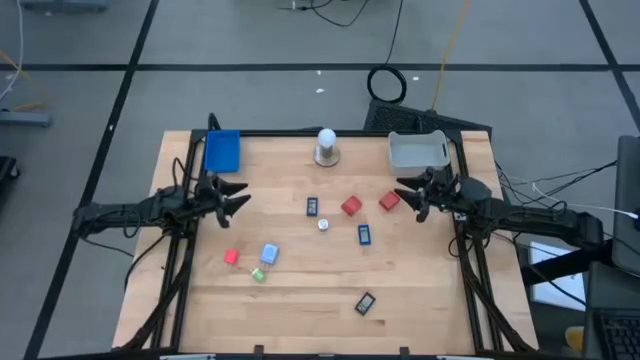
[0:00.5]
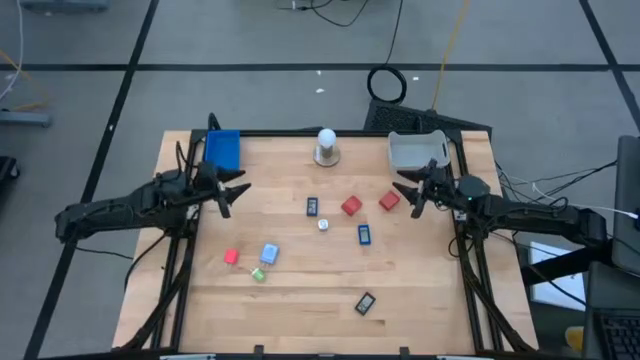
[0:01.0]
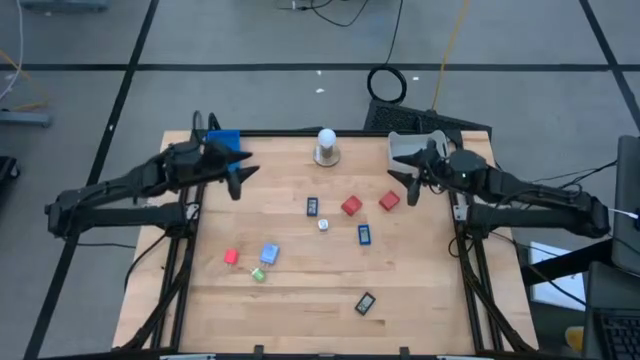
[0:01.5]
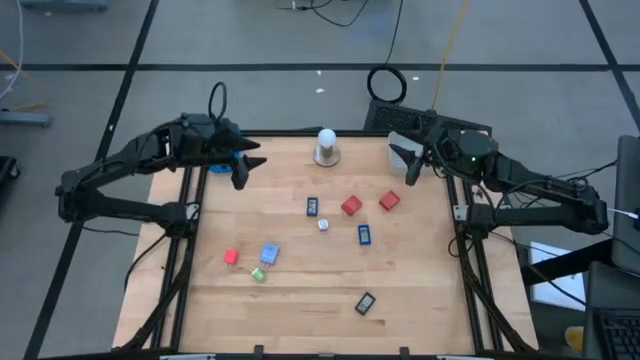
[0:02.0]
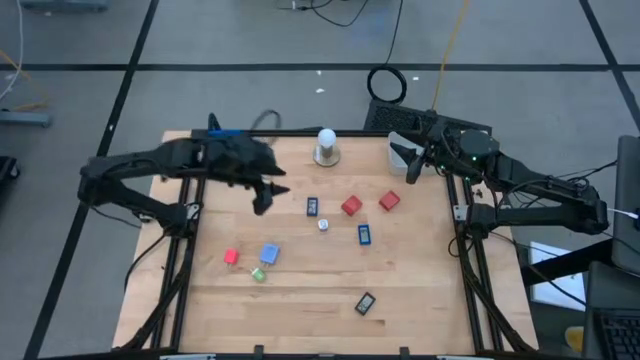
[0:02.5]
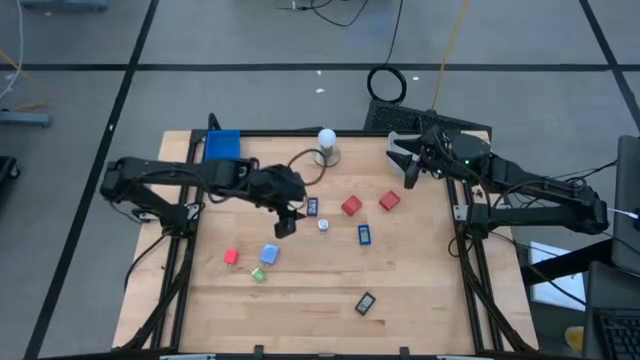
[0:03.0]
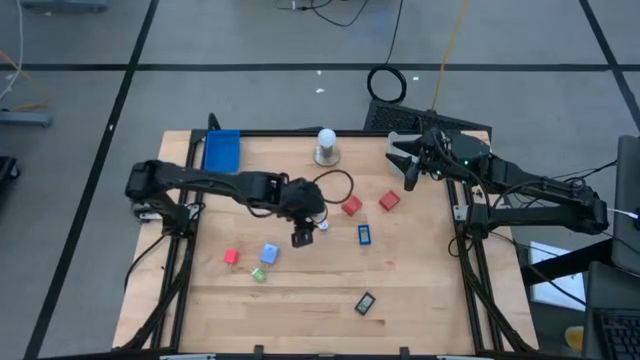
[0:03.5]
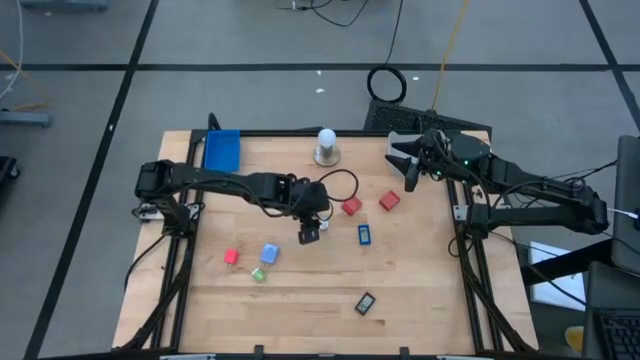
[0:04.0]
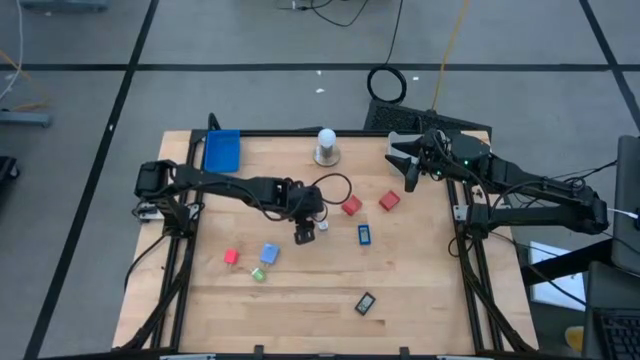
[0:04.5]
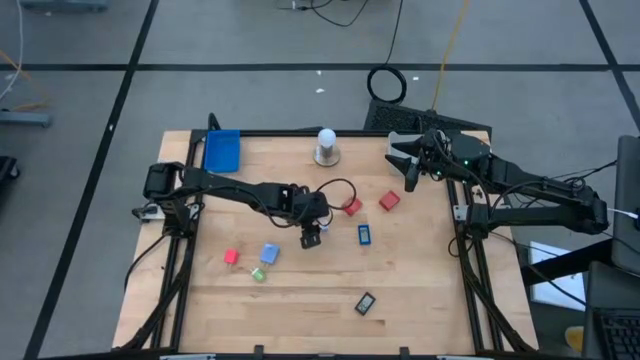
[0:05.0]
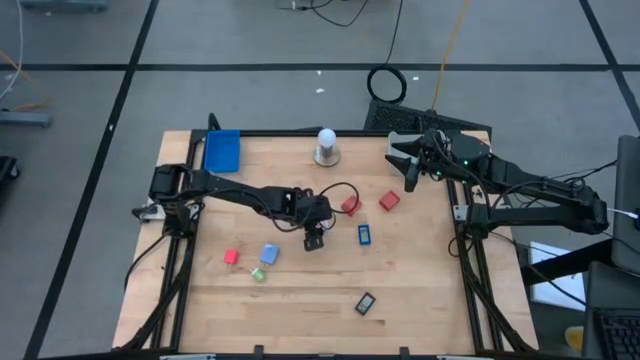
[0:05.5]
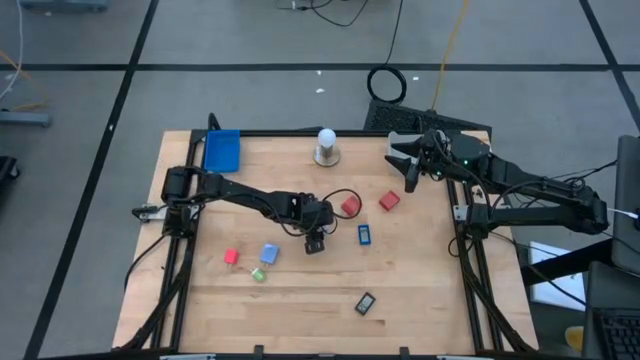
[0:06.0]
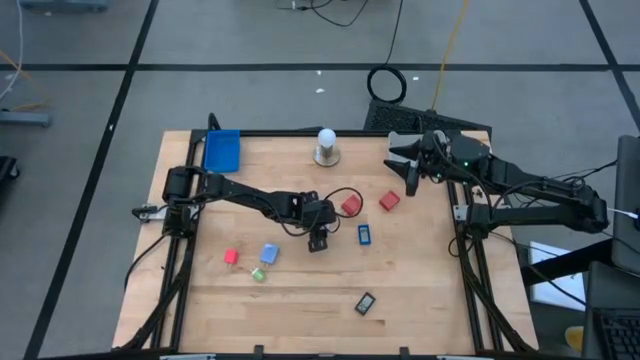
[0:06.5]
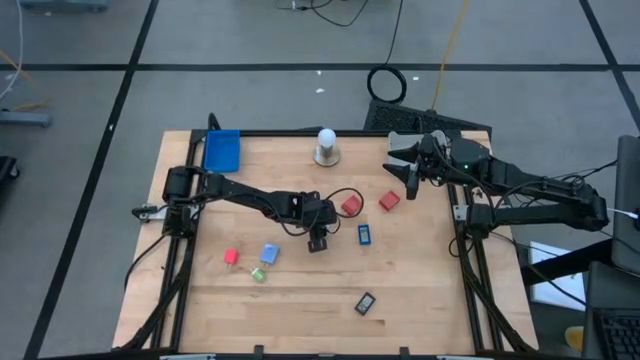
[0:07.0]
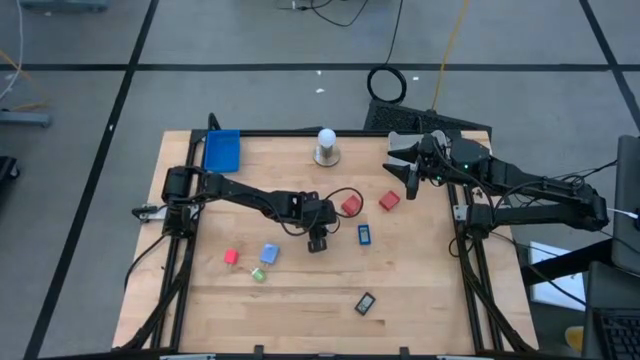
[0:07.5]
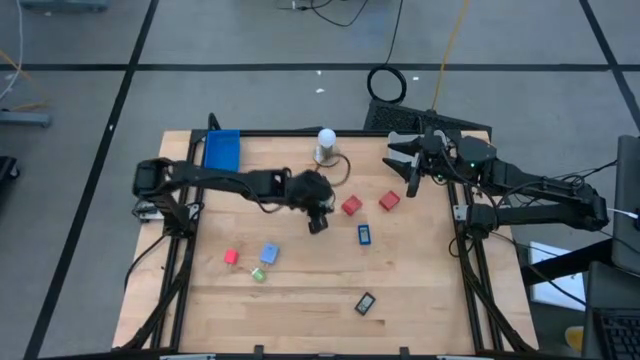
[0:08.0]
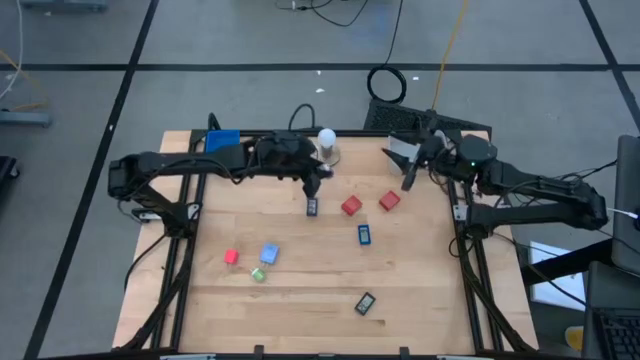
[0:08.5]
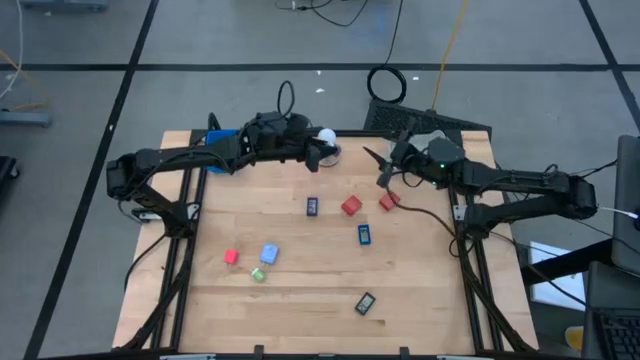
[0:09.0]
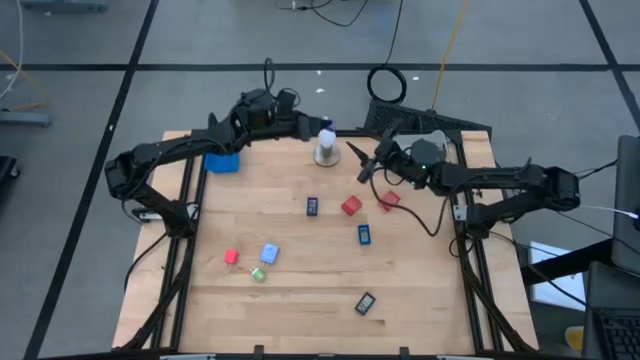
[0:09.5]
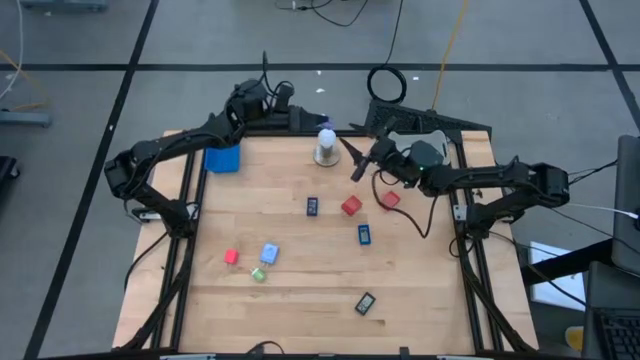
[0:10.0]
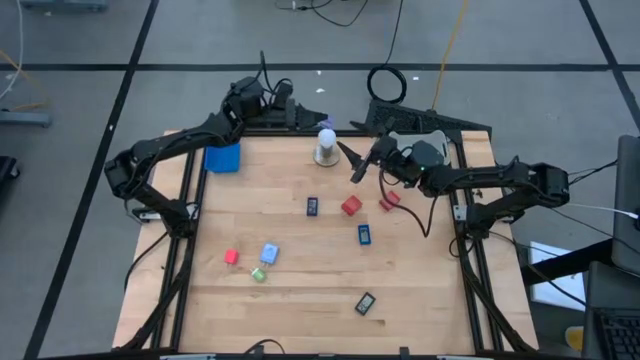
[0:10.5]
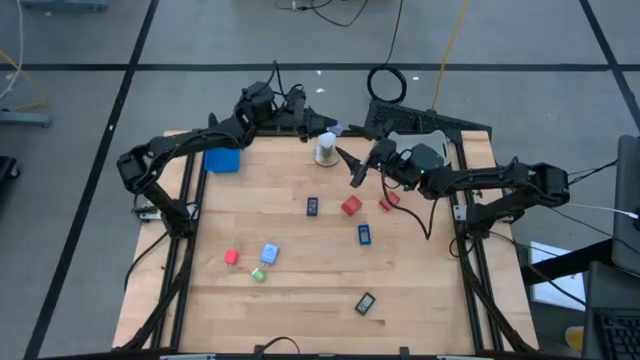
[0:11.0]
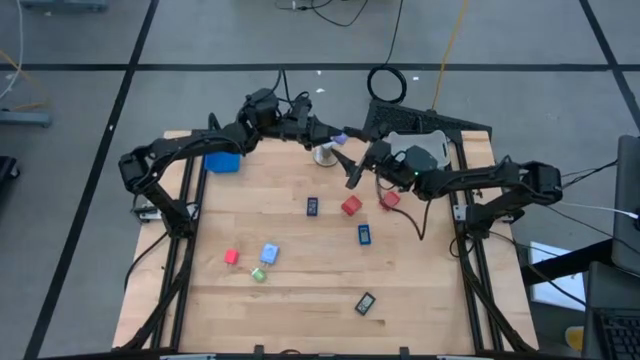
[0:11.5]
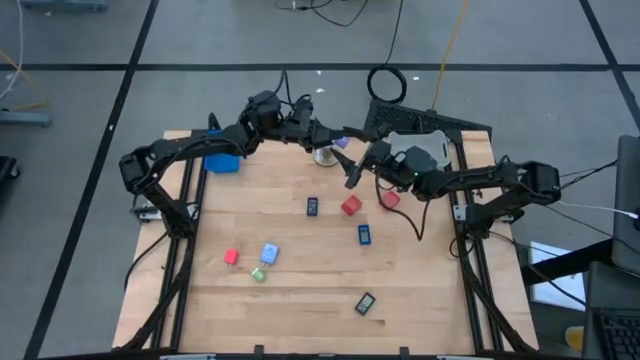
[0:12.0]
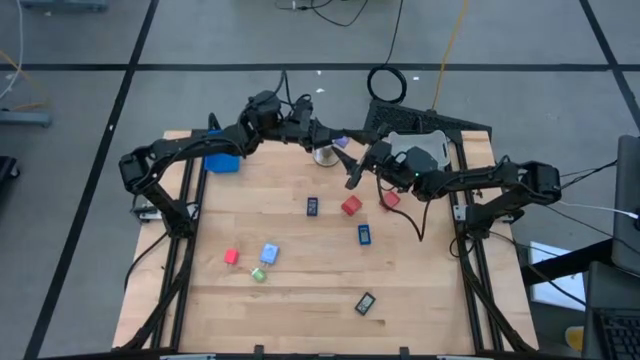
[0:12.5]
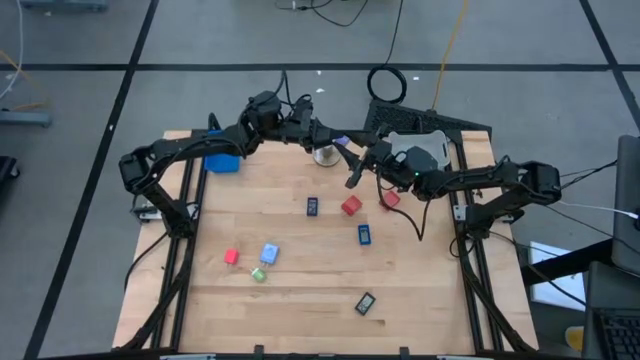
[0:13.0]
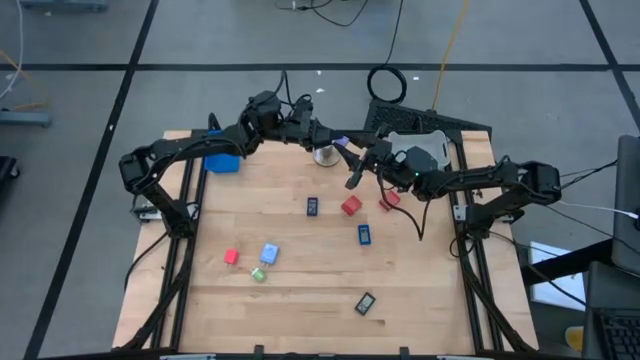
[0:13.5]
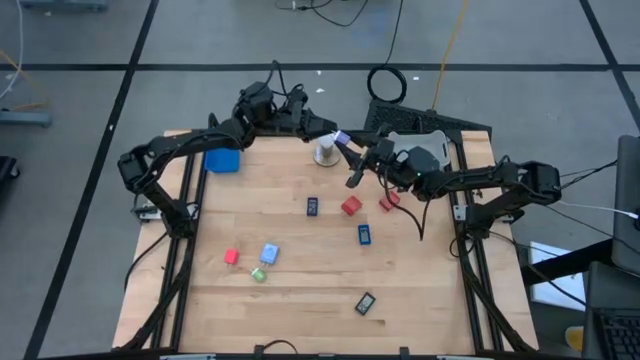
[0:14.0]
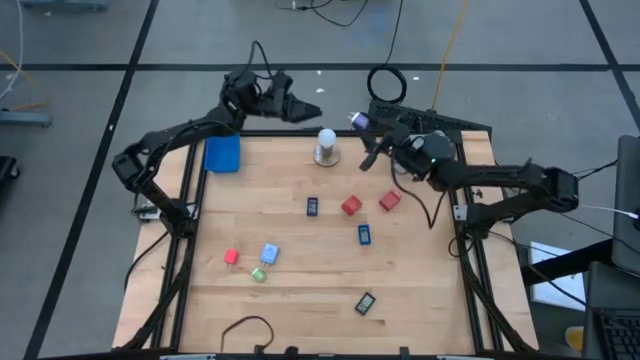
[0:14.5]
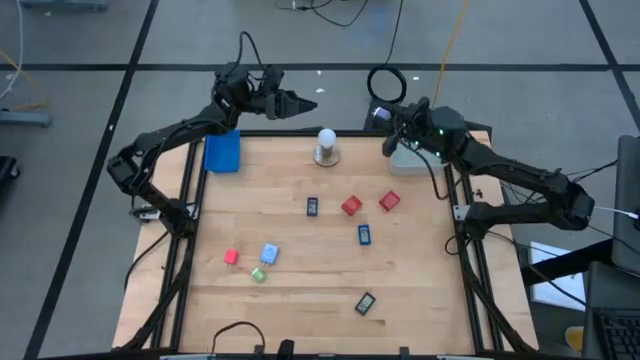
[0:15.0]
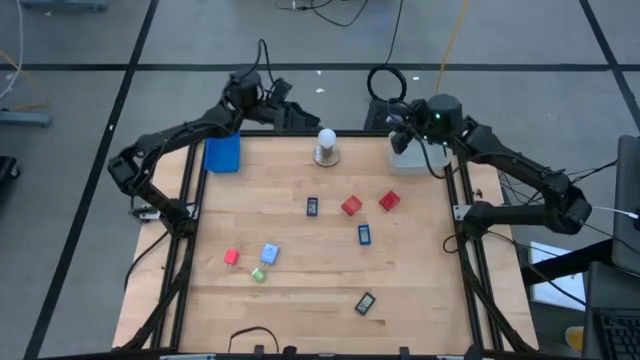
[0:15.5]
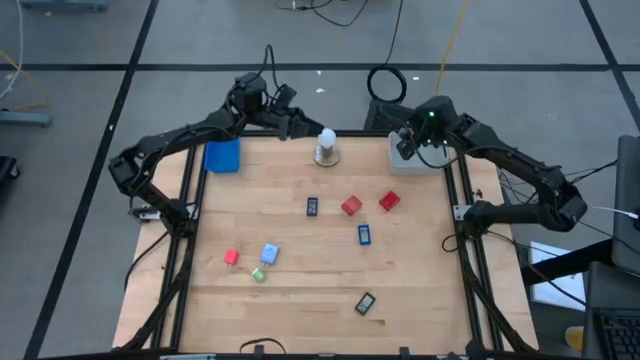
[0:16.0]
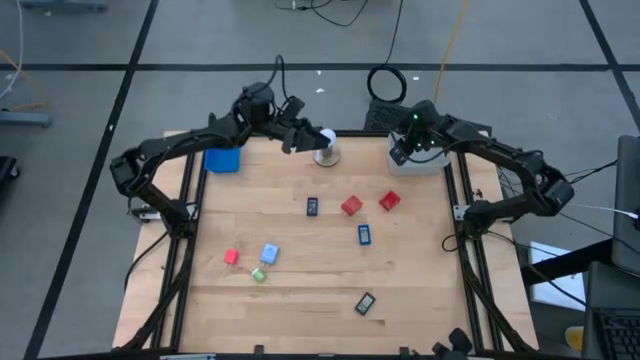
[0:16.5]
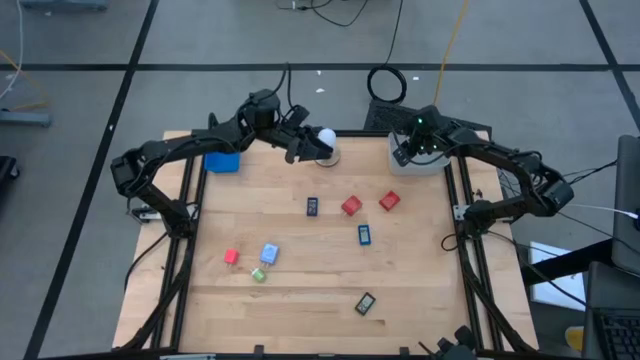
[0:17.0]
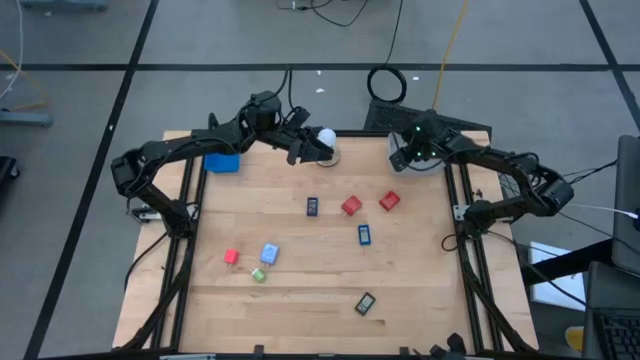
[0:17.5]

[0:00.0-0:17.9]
Task: Pick & Place Office items
Put the purple charger adapter into the gray bin
